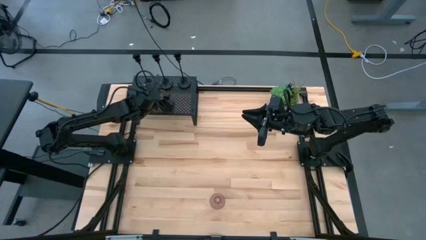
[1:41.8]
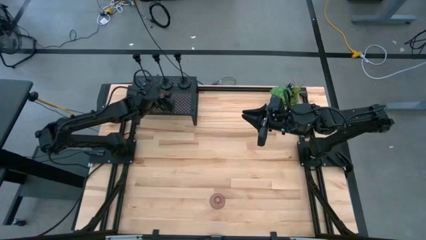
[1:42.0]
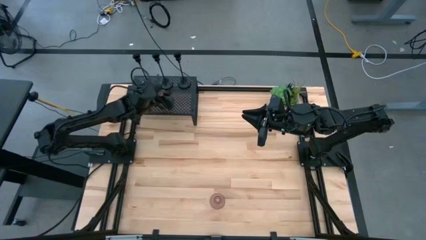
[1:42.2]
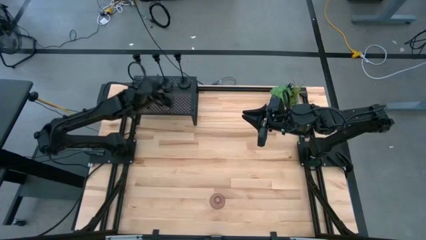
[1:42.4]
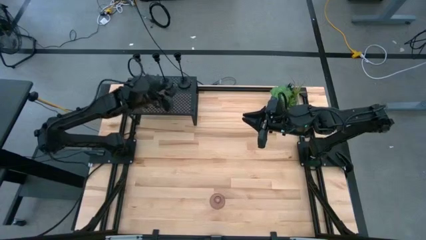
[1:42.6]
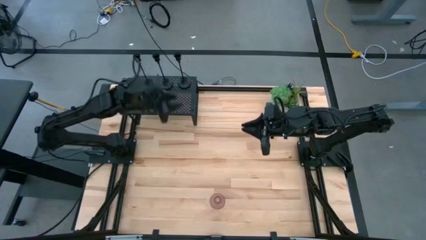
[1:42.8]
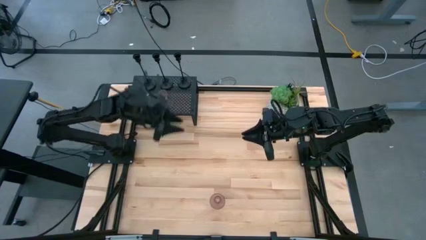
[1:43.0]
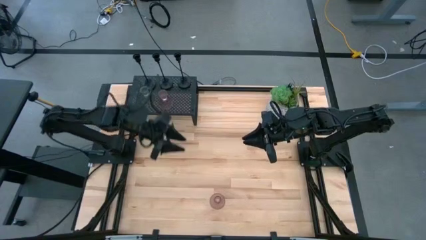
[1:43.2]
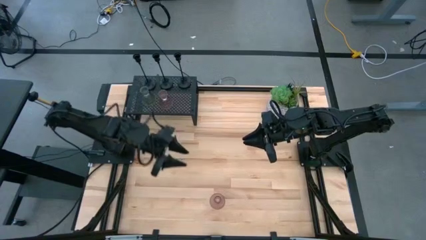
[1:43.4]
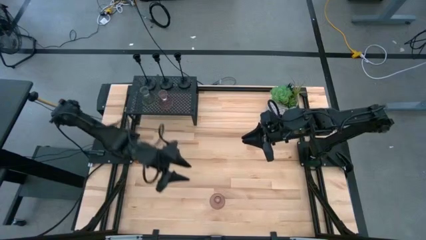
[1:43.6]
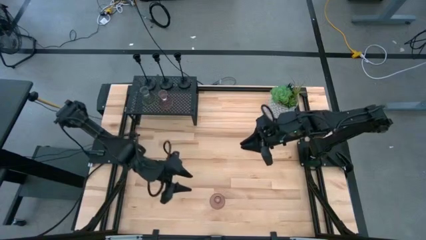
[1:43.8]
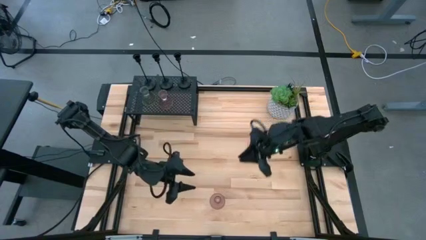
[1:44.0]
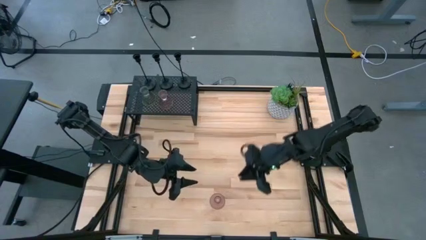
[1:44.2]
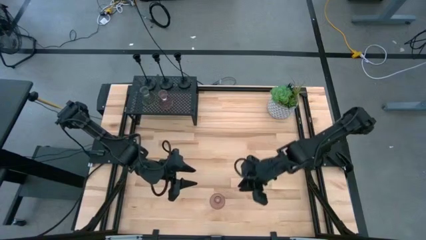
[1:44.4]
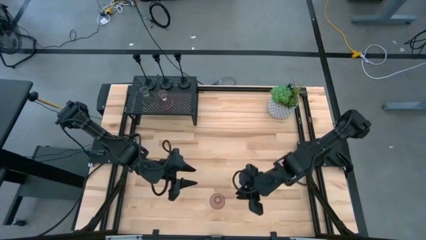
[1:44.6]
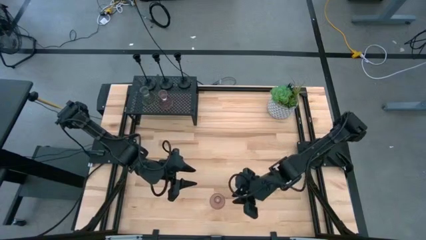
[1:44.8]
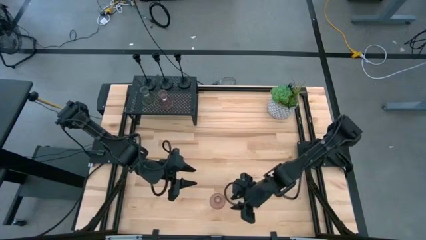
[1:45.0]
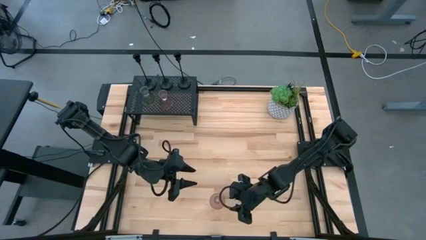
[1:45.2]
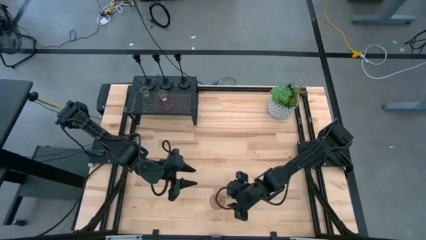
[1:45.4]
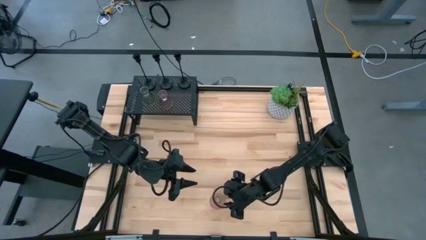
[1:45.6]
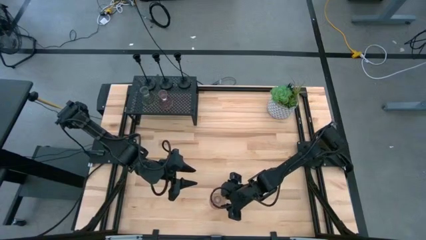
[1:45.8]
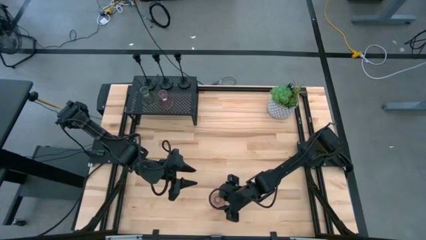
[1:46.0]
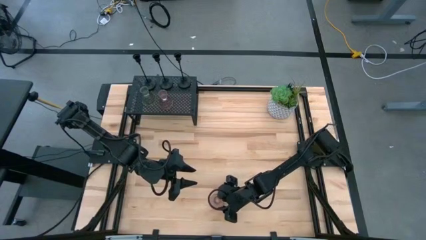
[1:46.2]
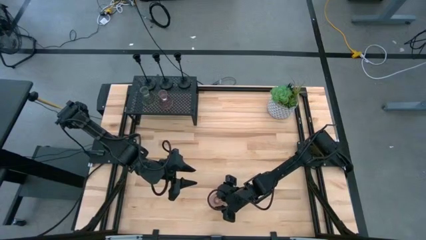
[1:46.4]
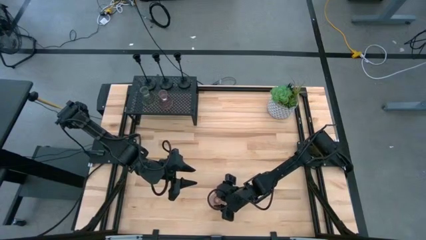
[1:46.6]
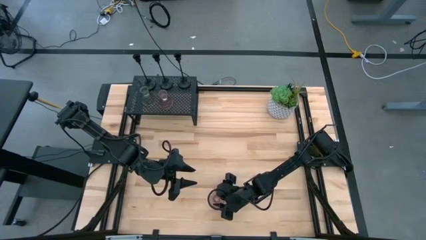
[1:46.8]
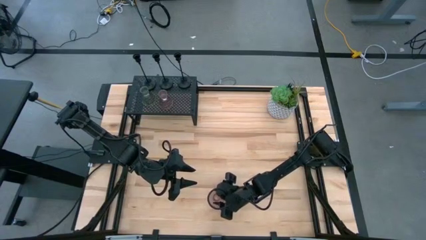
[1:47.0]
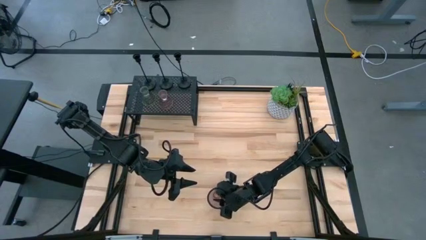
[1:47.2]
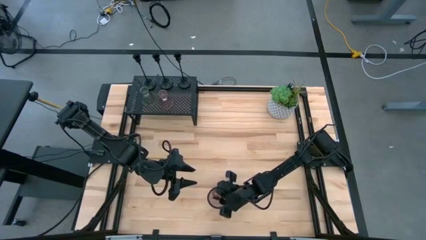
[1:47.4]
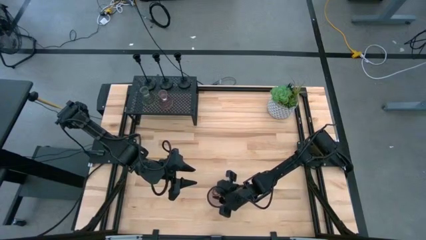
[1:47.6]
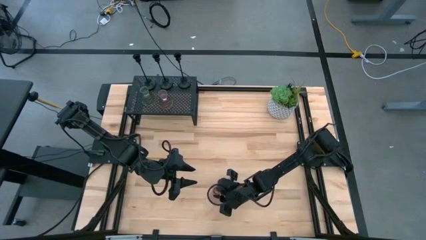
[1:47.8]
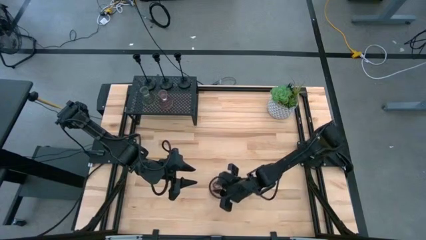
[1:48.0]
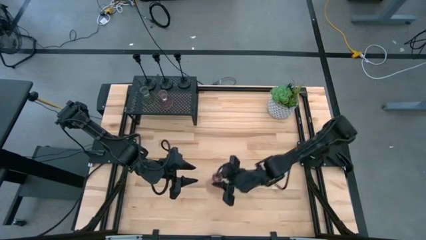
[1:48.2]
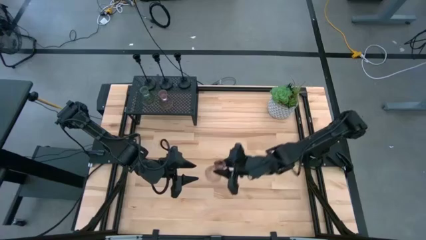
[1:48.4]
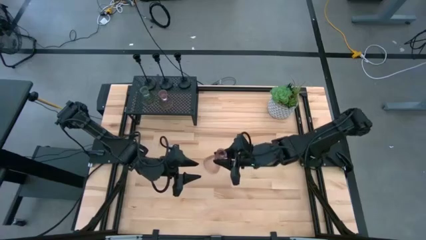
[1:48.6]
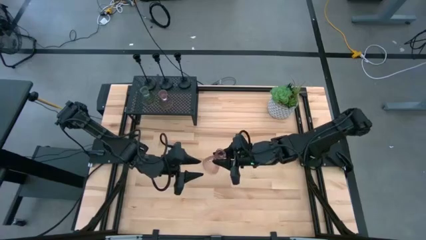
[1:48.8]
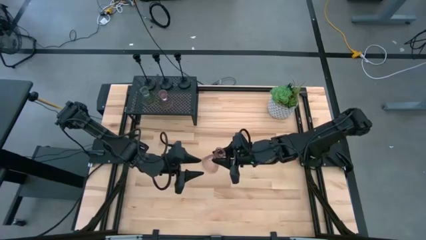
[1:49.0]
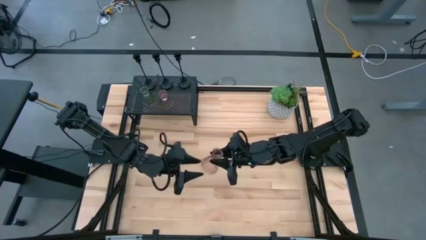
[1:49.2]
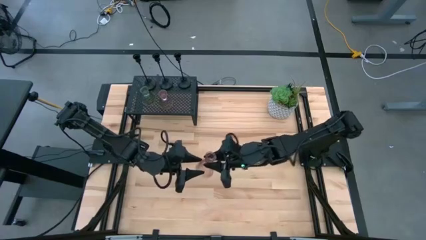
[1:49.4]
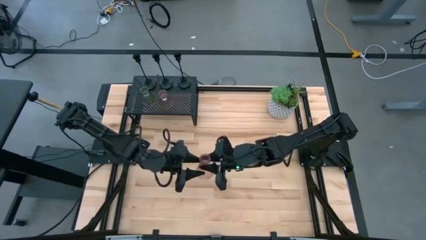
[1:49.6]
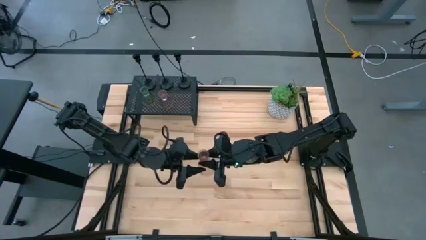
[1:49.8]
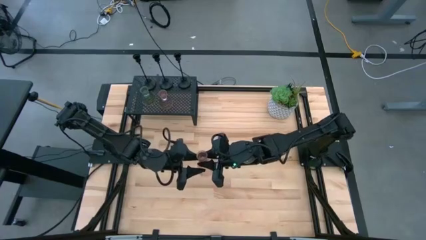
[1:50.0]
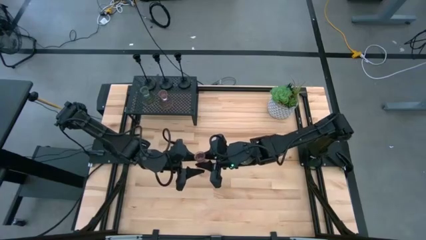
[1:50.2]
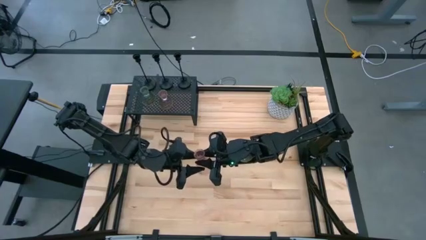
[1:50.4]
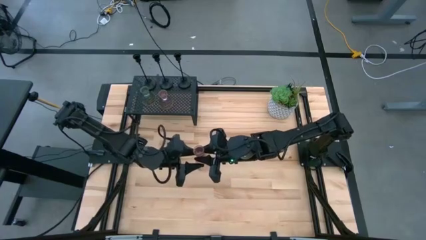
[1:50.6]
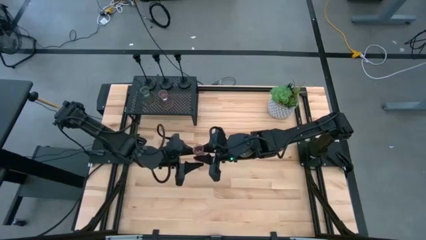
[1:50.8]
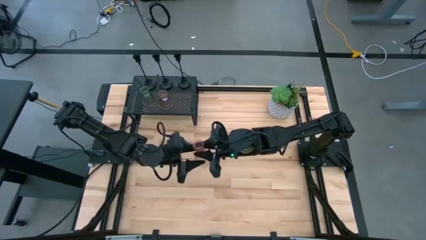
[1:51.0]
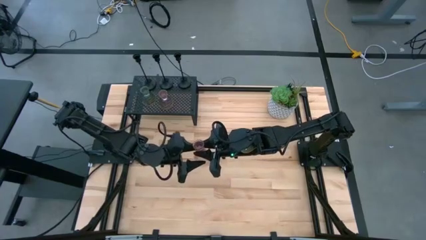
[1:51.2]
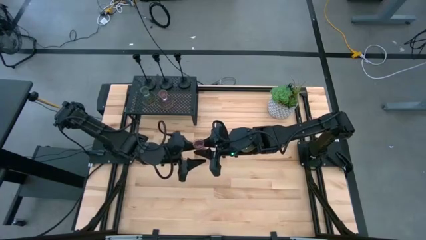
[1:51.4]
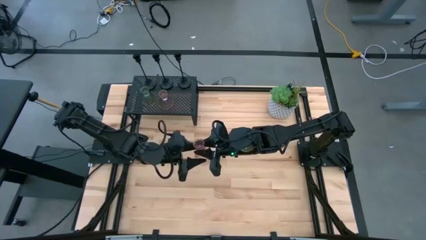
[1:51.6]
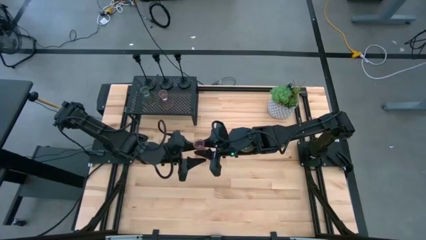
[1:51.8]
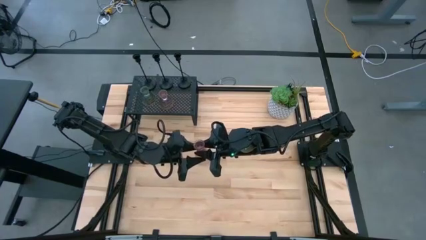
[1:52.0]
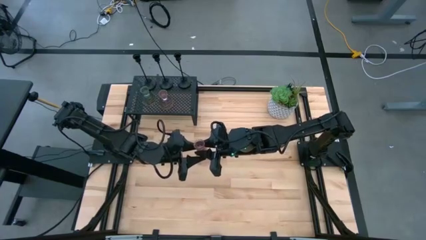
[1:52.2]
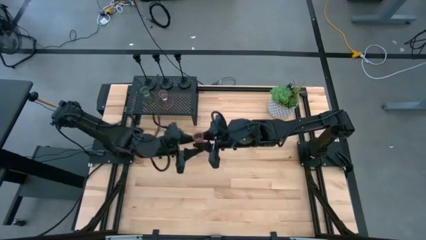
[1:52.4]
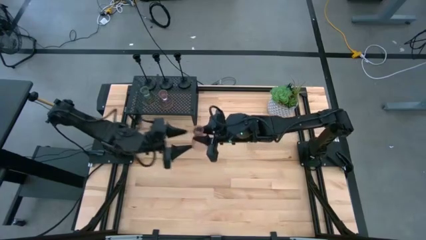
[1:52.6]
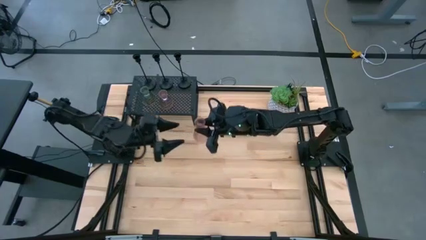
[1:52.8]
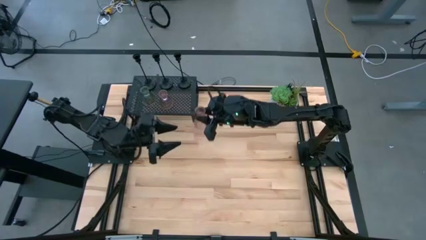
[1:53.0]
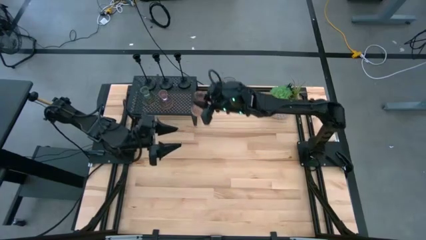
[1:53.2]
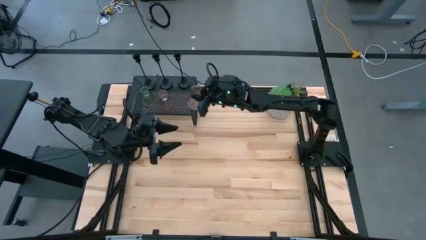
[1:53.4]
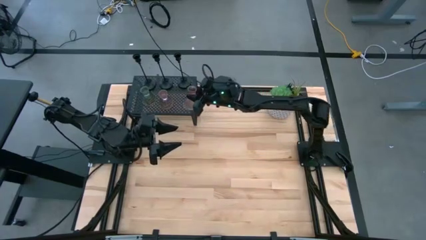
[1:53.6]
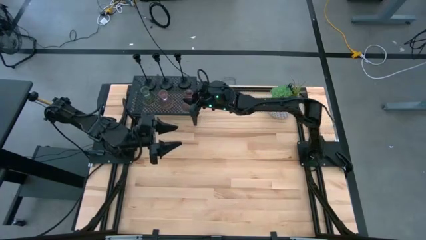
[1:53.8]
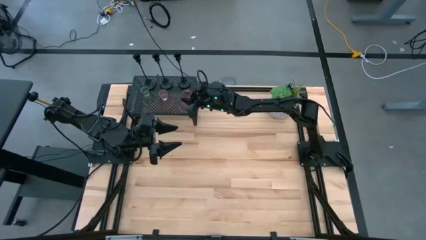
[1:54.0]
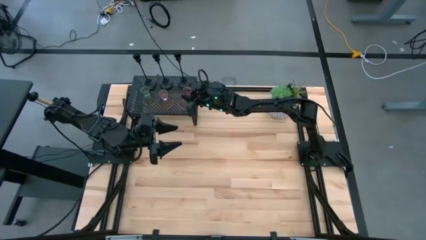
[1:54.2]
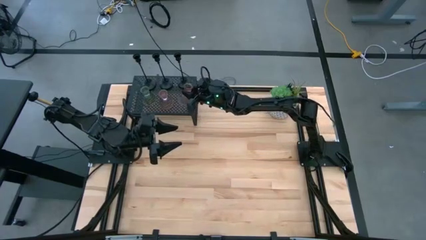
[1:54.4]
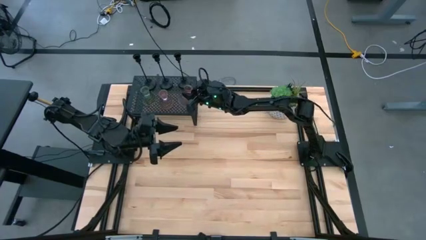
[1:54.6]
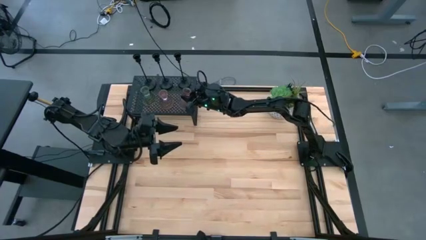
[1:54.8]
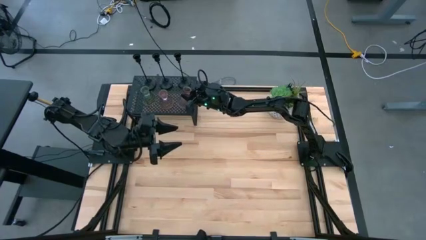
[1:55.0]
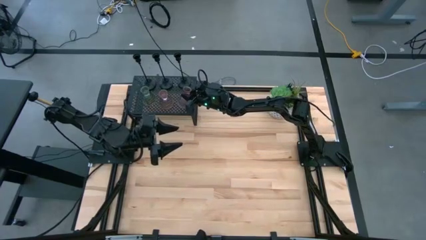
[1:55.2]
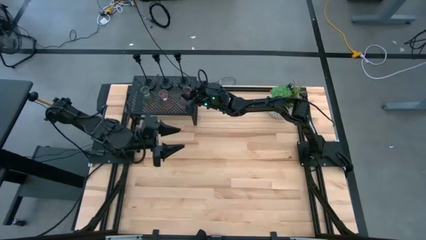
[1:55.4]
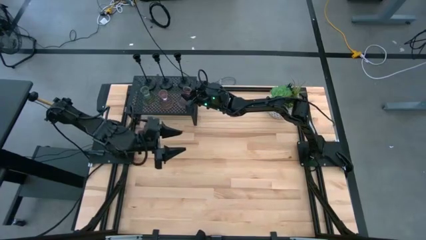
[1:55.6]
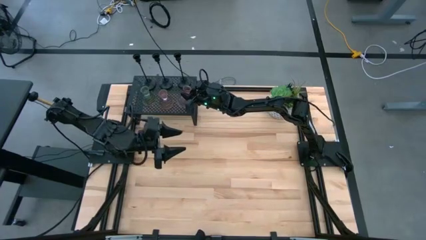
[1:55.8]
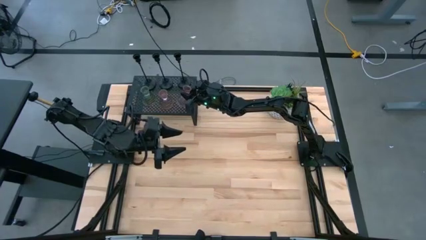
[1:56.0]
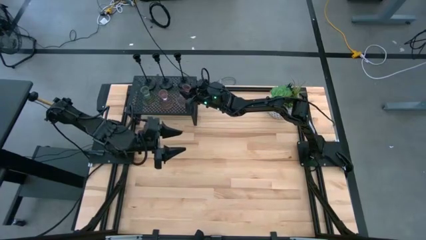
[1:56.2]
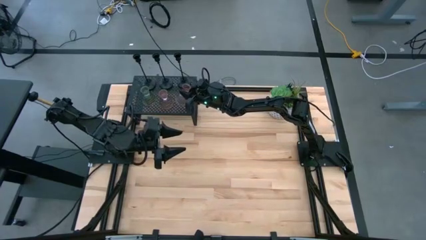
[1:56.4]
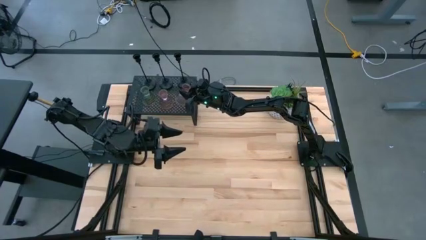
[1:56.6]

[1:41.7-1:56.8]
Task: Pick & Place candle stick holders
Put the pink glass candle holder on the shelf aligned with the other pink glass candle holder

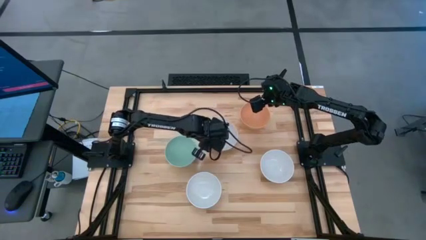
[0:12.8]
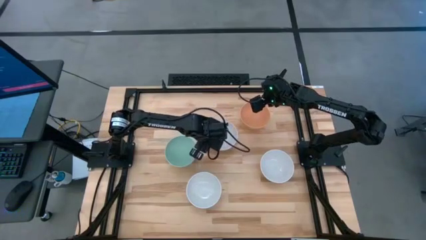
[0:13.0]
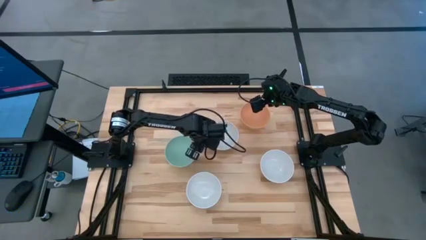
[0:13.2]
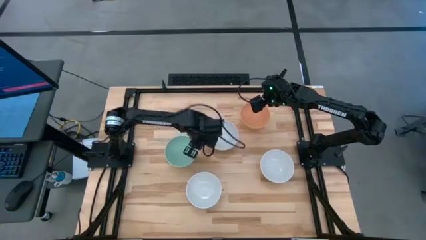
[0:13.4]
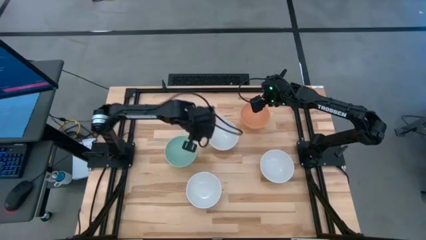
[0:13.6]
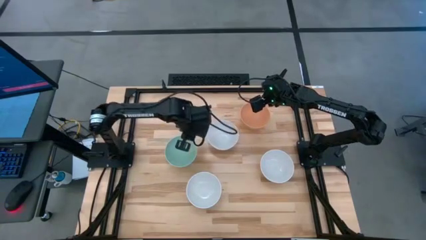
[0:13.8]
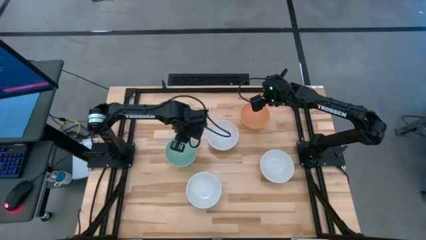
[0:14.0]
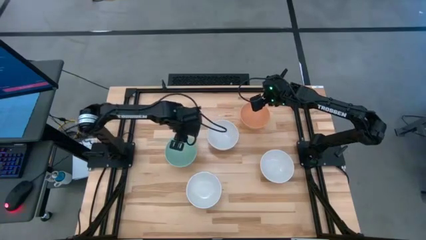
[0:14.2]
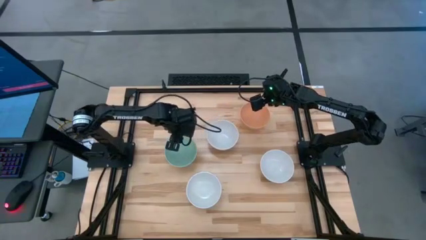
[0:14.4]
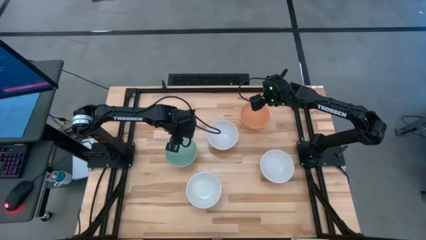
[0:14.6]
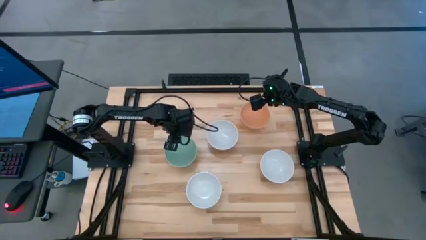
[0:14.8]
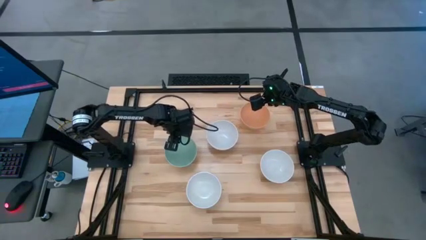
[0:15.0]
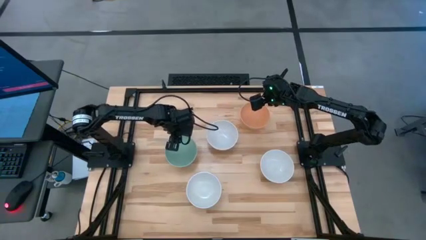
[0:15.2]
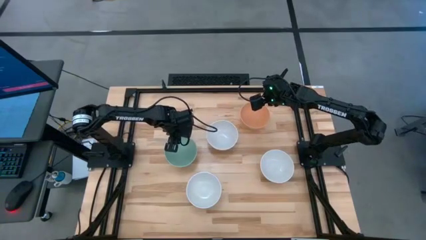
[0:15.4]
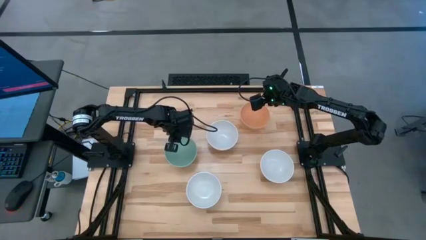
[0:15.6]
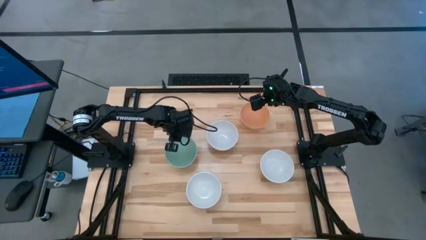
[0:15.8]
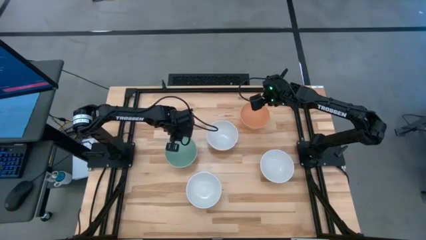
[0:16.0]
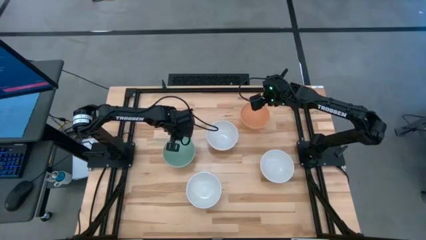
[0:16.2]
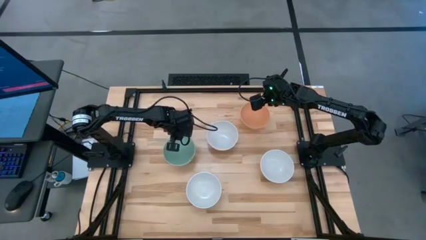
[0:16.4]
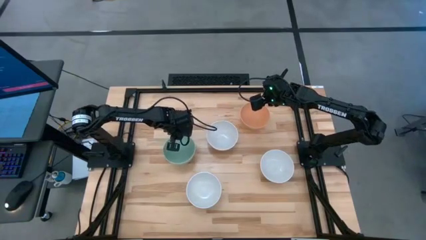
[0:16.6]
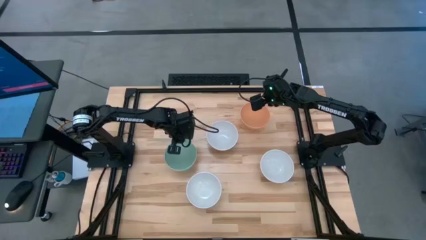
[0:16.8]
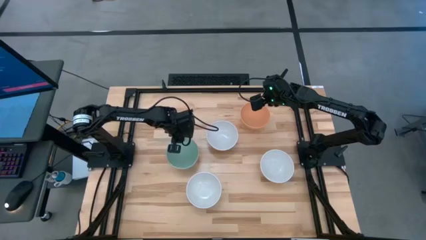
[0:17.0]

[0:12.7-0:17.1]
Task: Nest bowls inside each other
Stack the green bowl on top of the middle white bowl
